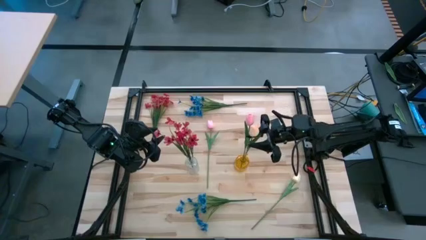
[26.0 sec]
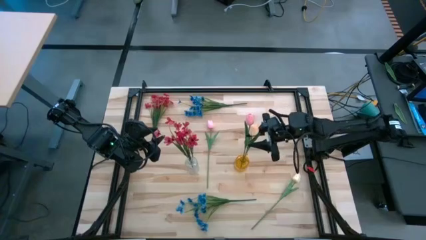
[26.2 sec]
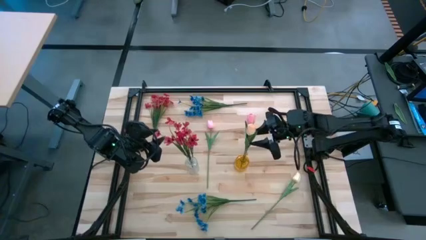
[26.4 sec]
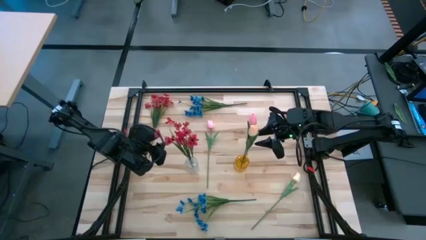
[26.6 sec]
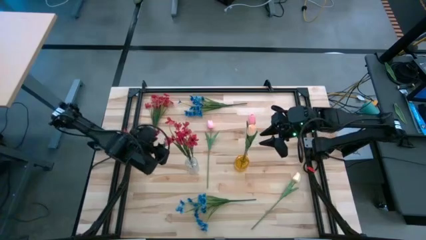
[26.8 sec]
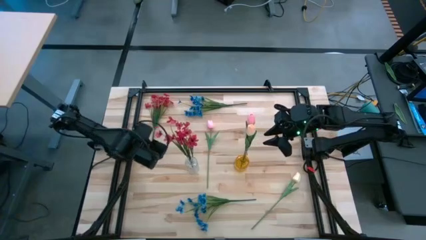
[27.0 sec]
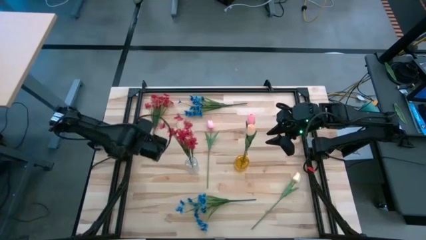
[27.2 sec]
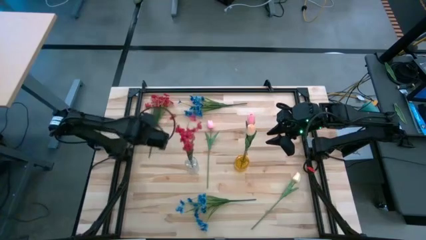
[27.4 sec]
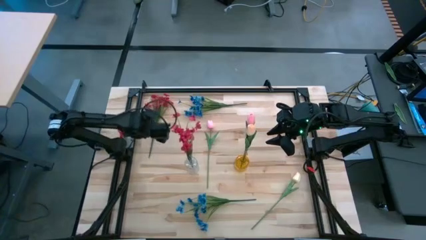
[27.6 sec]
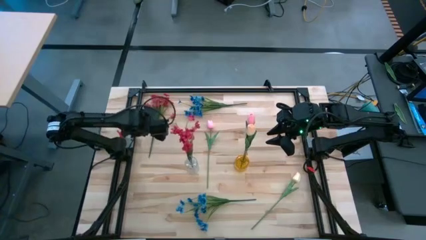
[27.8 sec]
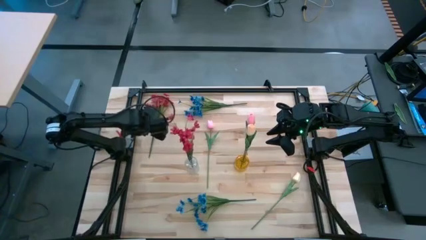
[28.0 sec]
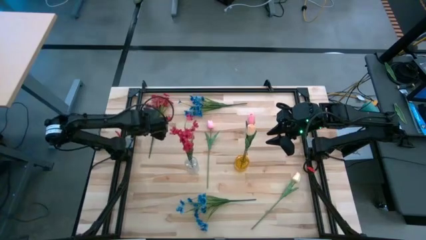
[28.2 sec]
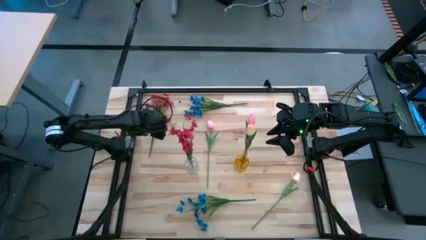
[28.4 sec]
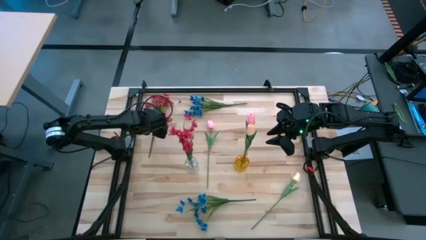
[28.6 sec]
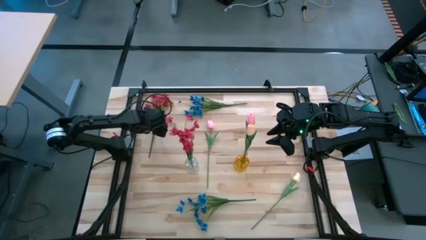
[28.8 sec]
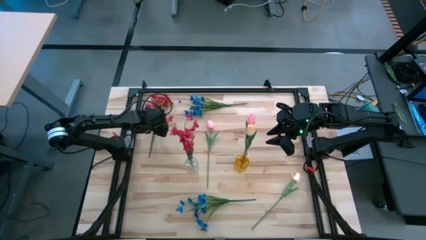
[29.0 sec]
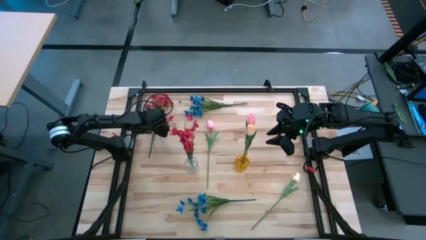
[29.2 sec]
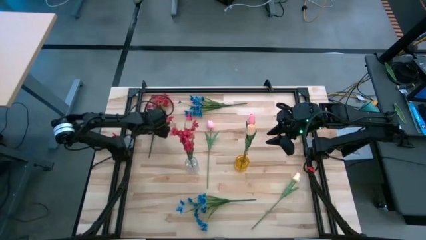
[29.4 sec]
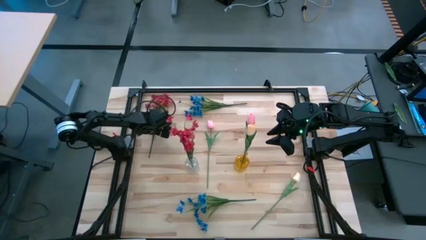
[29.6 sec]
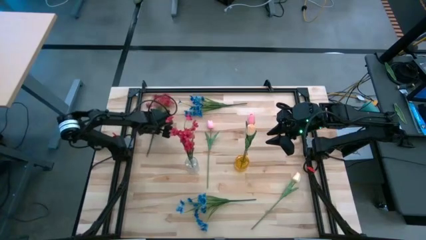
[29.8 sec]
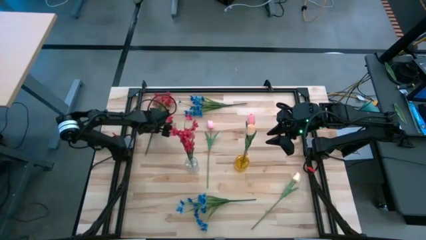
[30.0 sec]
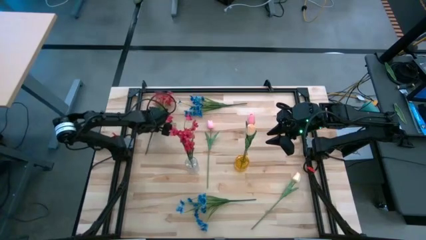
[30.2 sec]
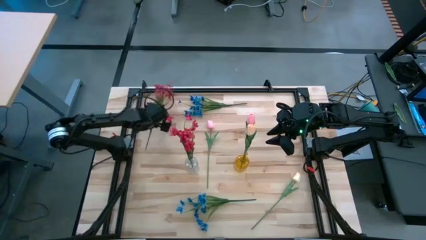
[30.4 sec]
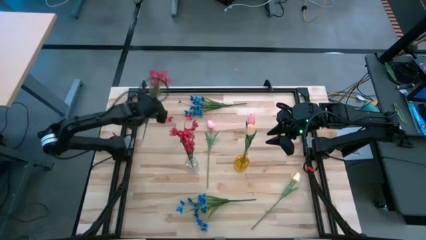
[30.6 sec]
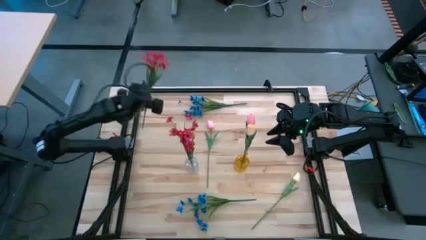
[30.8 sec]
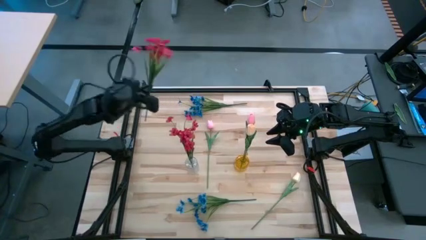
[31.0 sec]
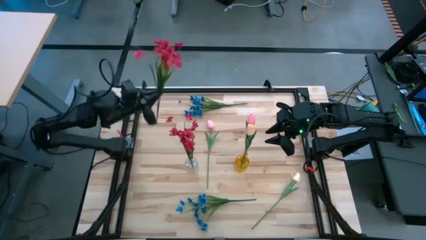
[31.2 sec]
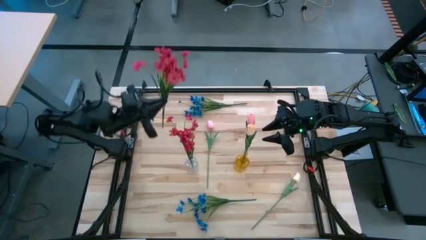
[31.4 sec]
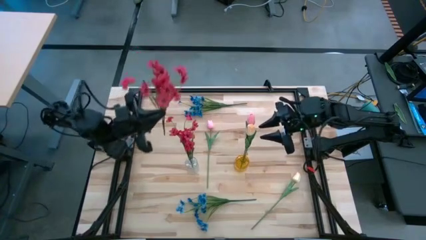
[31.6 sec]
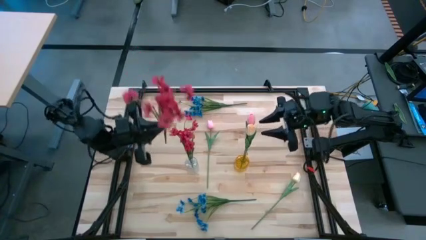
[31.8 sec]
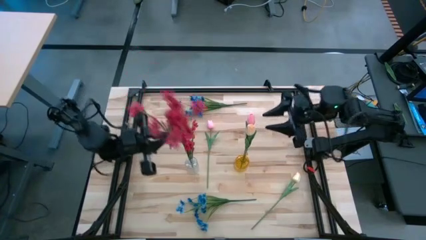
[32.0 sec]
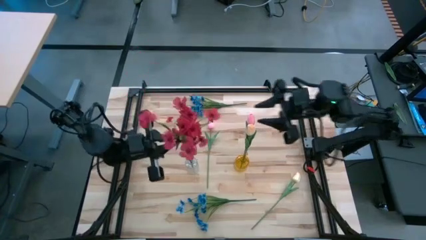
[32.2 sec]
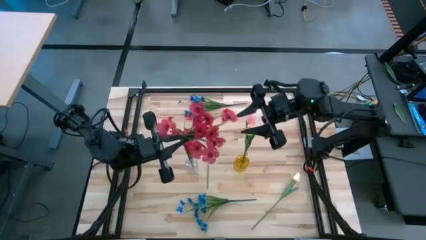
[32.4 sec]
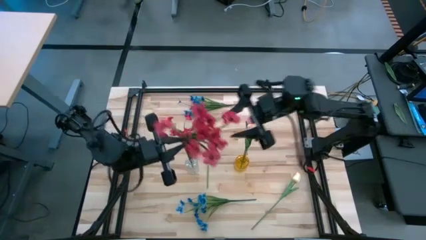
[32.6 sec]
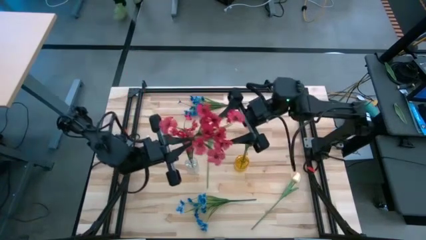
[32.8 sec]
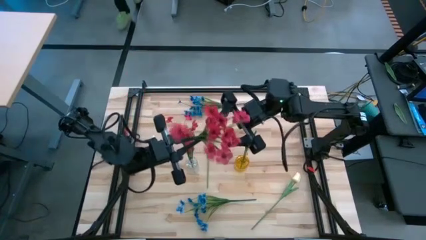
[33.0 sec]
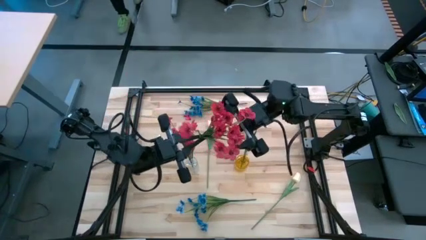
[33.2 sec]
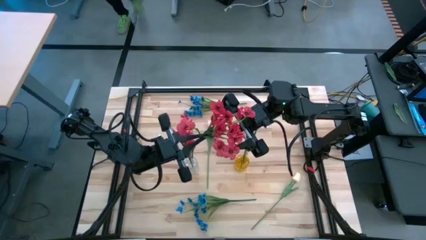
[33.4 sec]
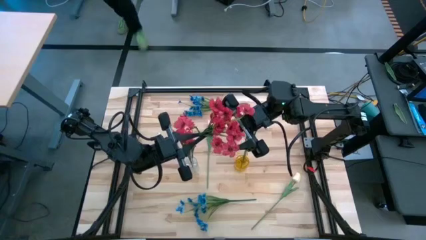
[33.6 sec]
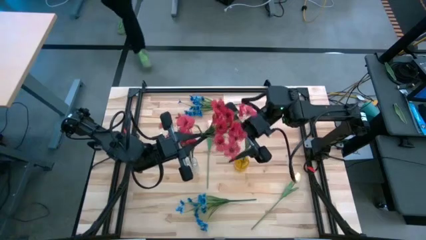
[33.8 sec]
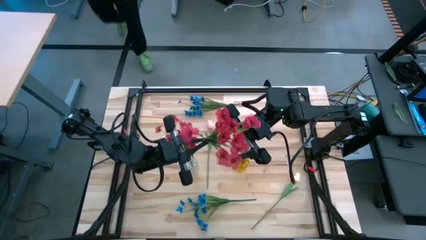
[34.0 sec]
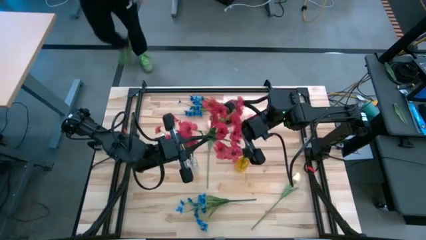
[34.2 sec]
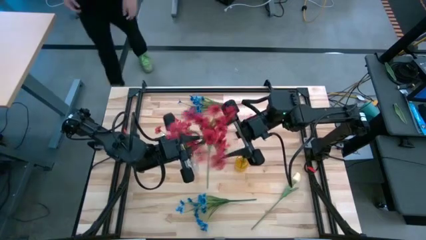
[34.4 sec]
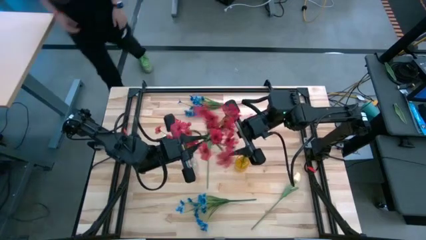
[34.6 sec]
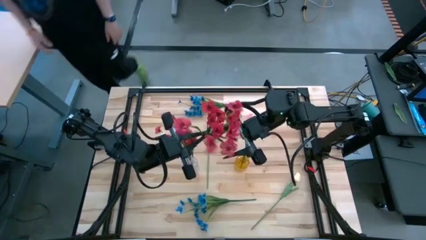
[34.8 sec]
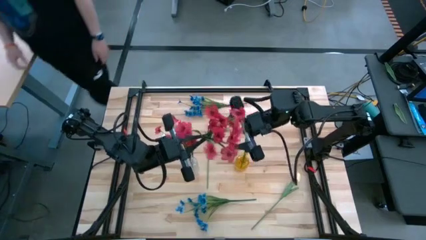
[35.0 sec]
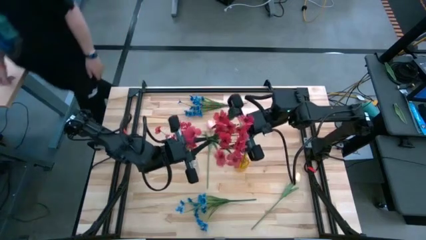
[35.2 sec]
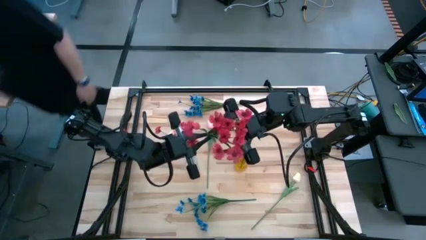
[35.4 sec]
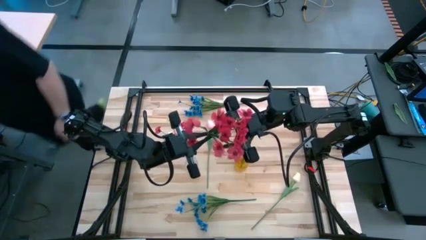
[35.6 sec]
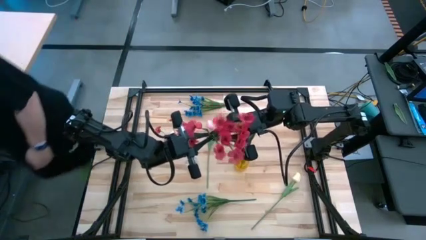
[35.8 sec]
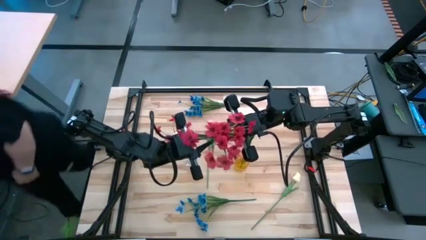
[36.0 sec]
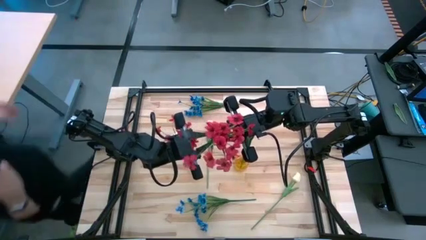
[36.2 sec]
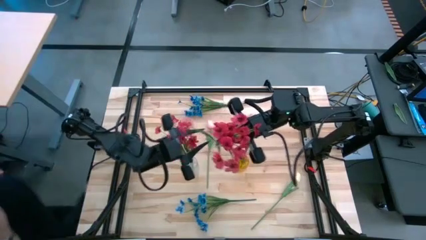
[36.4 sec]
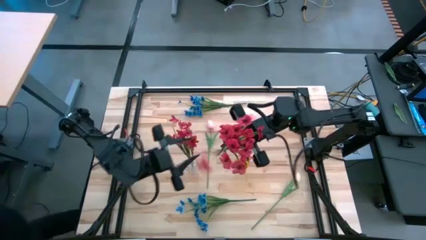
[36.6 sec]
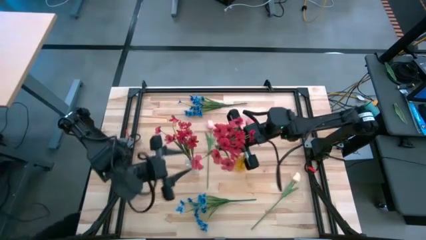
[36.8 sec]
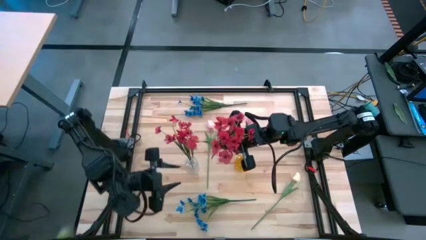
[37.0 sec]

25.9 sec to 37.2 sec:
Task: Sort flowers into vase by color
Put the red flower into the transparent vase
